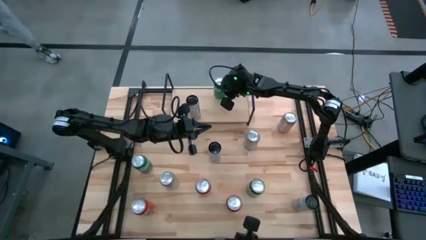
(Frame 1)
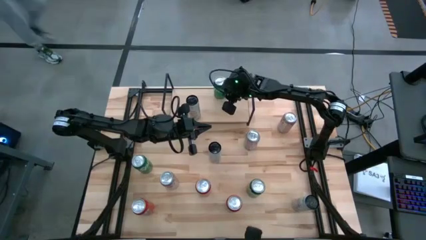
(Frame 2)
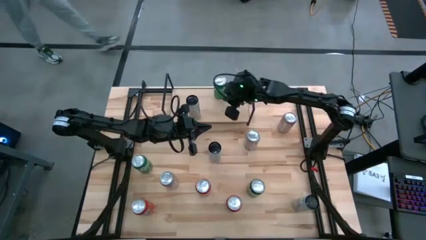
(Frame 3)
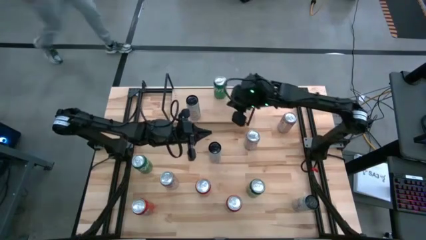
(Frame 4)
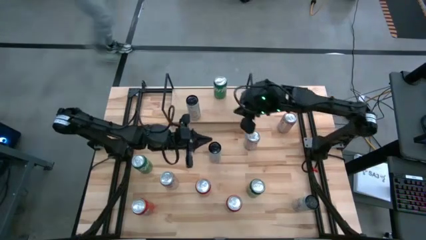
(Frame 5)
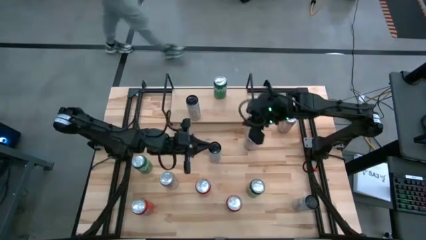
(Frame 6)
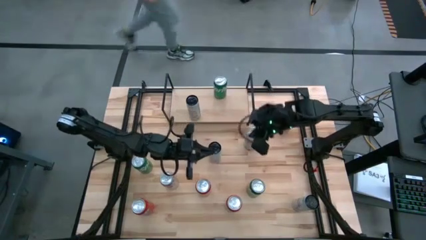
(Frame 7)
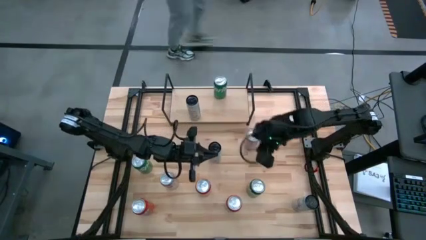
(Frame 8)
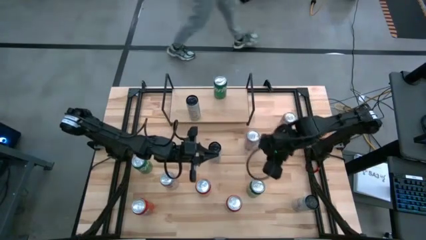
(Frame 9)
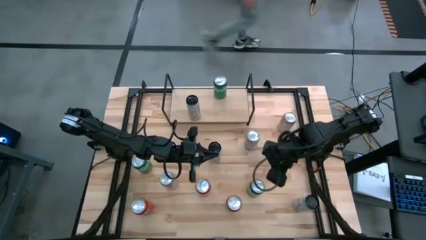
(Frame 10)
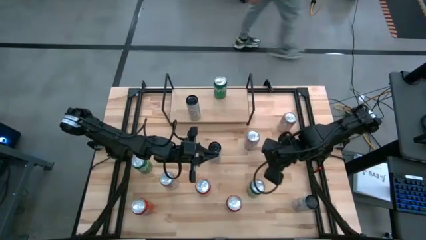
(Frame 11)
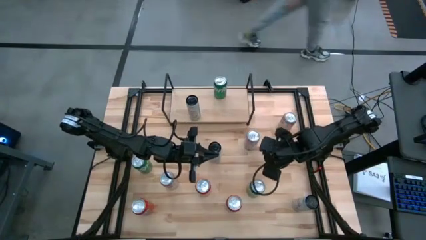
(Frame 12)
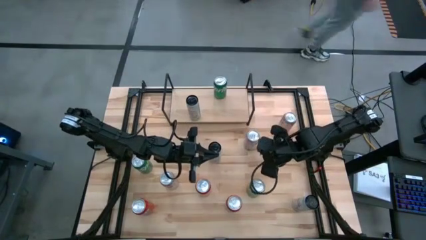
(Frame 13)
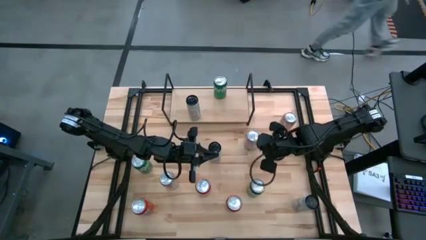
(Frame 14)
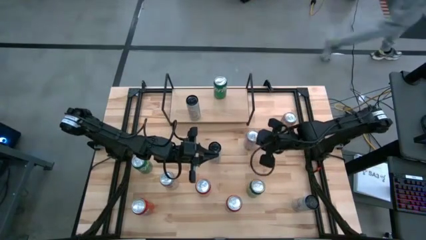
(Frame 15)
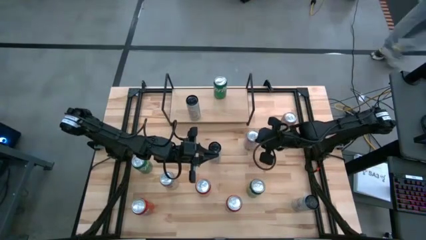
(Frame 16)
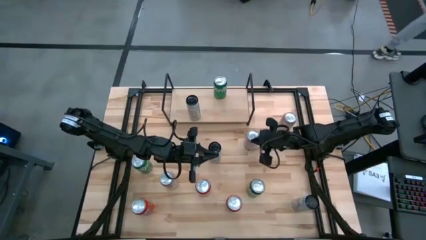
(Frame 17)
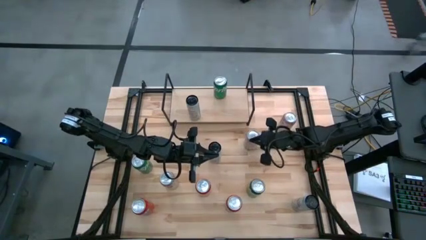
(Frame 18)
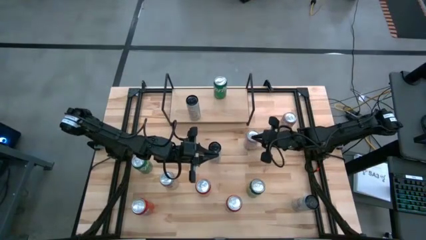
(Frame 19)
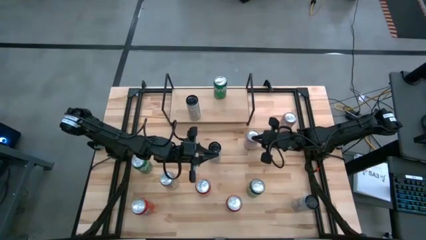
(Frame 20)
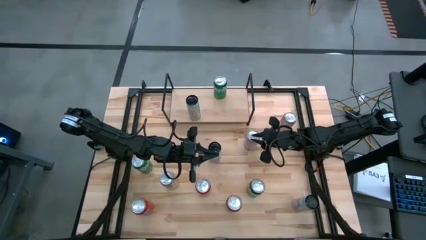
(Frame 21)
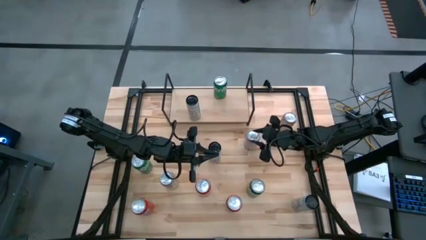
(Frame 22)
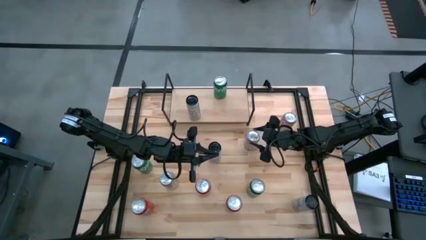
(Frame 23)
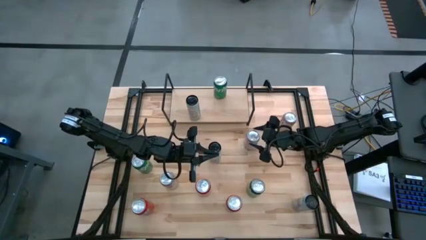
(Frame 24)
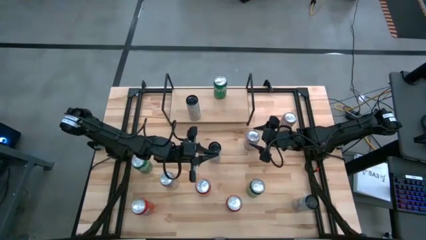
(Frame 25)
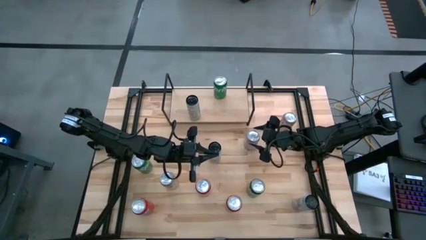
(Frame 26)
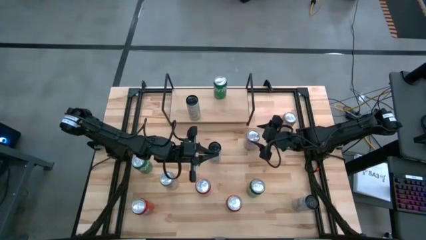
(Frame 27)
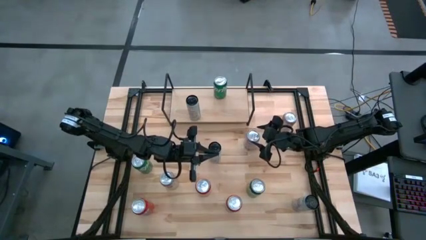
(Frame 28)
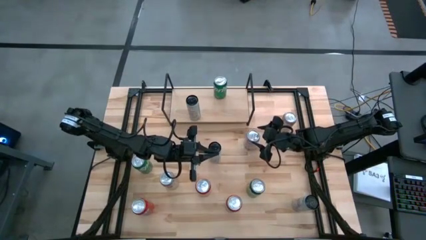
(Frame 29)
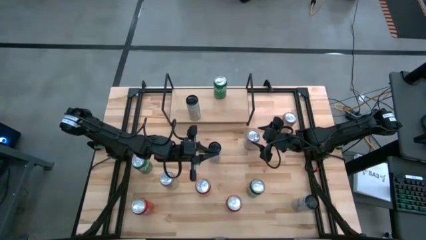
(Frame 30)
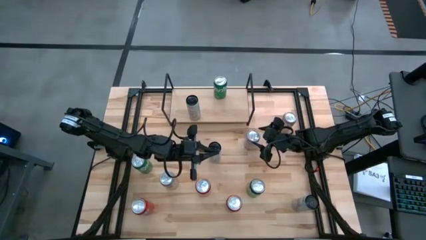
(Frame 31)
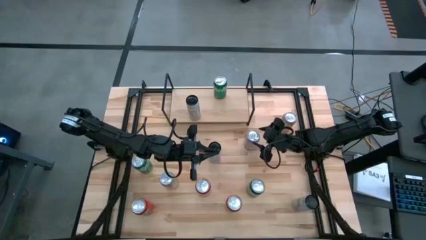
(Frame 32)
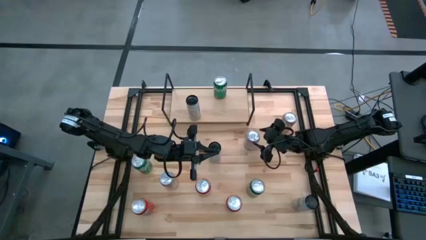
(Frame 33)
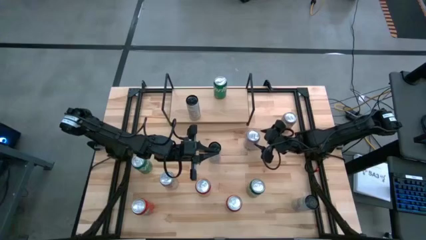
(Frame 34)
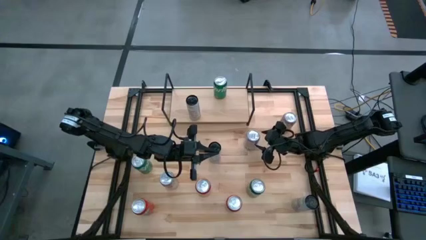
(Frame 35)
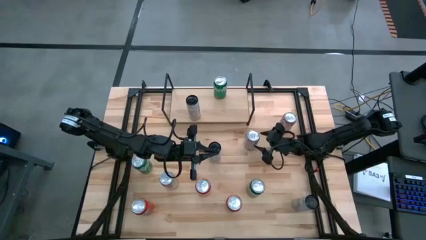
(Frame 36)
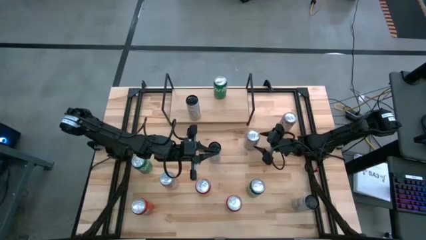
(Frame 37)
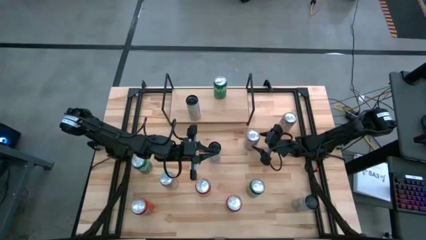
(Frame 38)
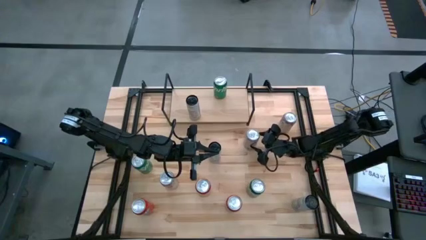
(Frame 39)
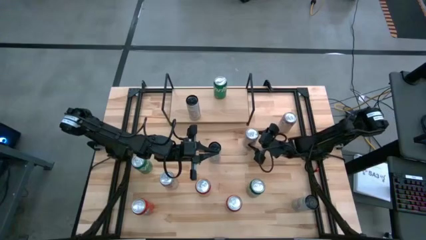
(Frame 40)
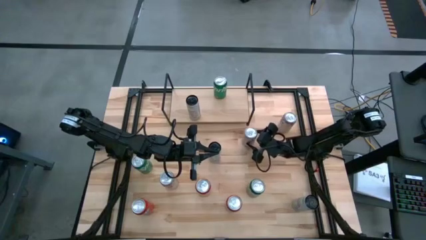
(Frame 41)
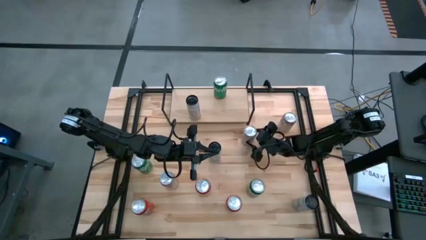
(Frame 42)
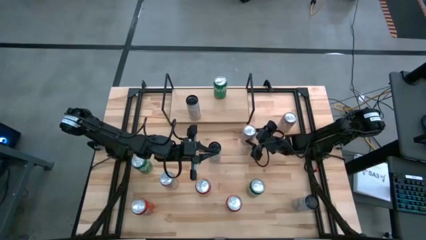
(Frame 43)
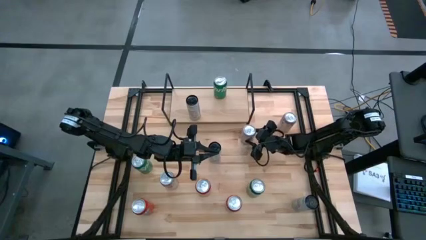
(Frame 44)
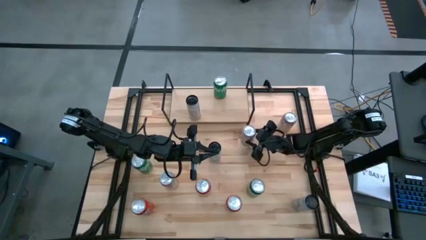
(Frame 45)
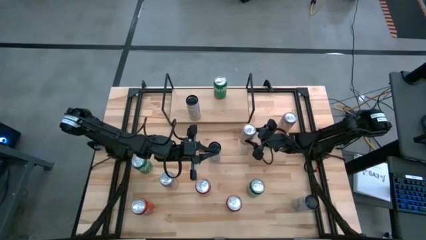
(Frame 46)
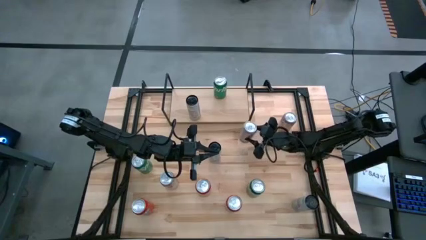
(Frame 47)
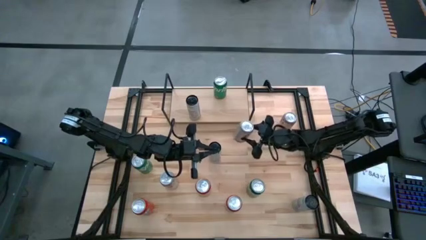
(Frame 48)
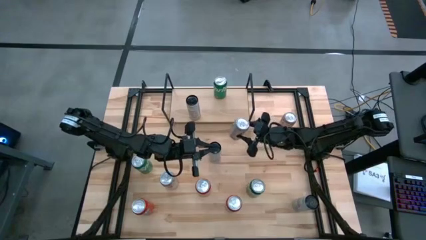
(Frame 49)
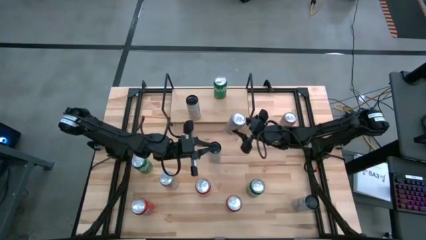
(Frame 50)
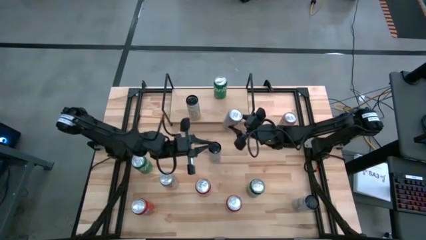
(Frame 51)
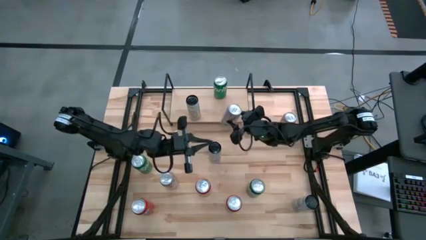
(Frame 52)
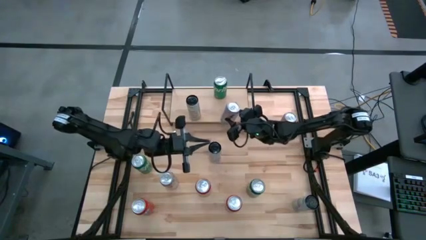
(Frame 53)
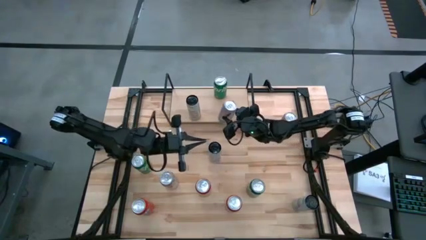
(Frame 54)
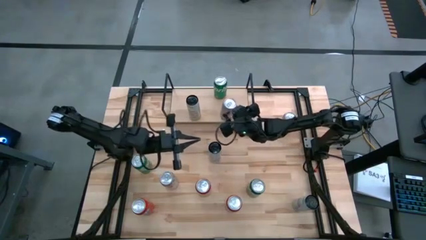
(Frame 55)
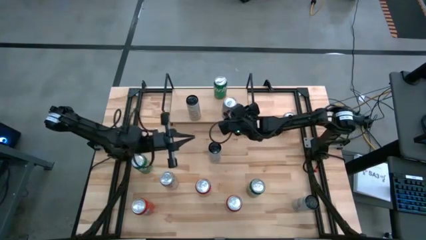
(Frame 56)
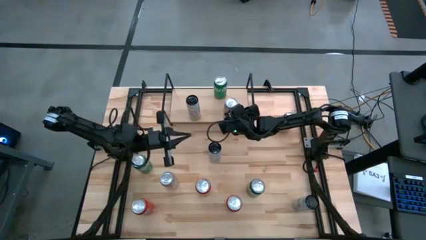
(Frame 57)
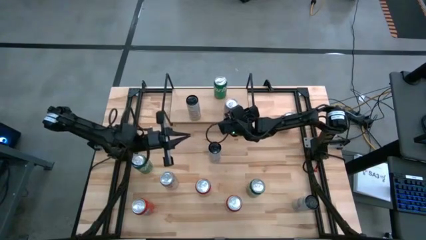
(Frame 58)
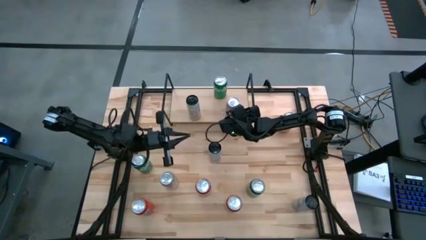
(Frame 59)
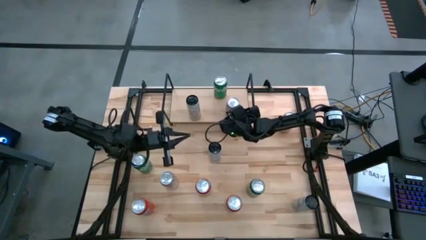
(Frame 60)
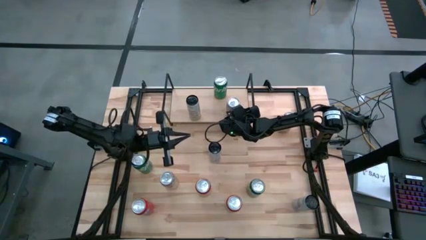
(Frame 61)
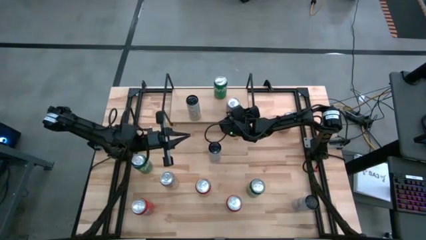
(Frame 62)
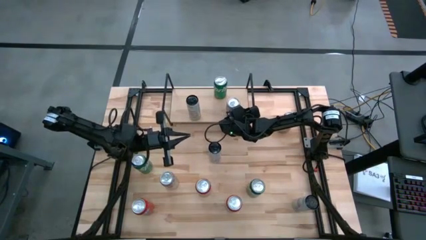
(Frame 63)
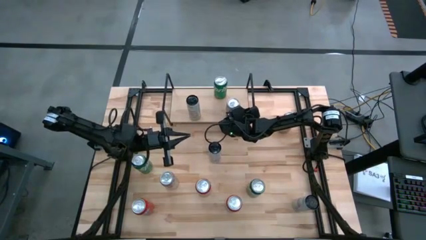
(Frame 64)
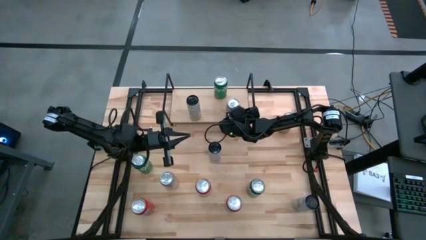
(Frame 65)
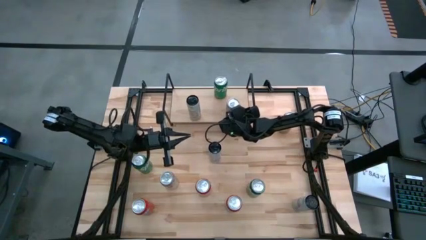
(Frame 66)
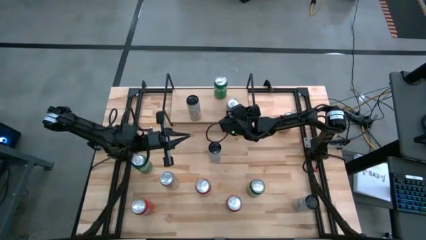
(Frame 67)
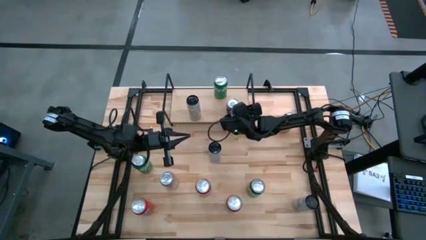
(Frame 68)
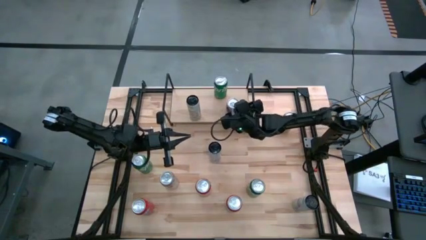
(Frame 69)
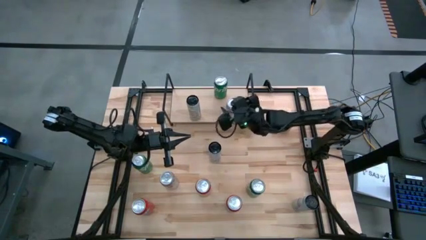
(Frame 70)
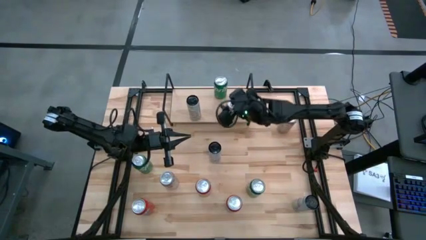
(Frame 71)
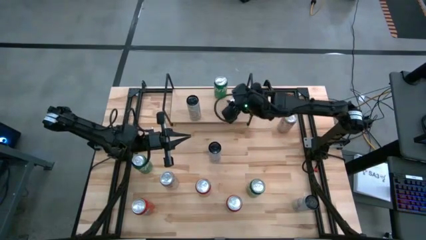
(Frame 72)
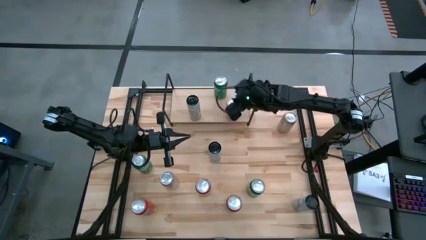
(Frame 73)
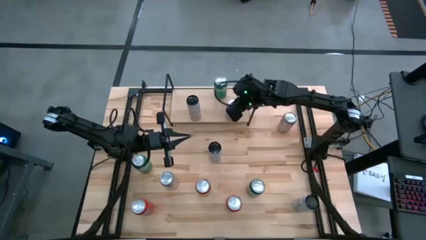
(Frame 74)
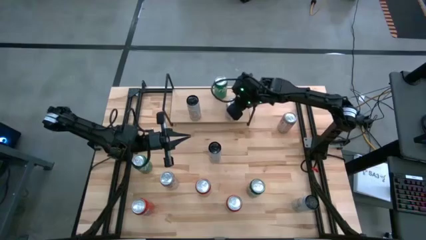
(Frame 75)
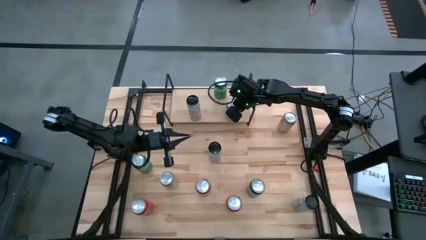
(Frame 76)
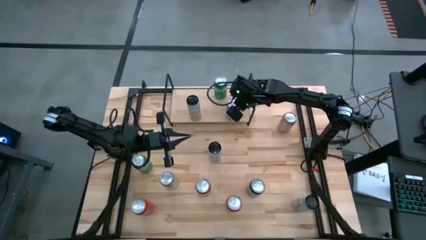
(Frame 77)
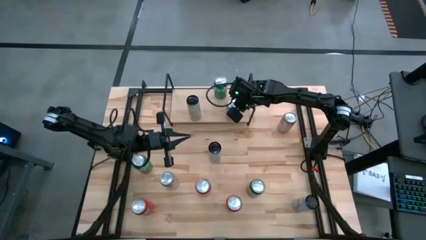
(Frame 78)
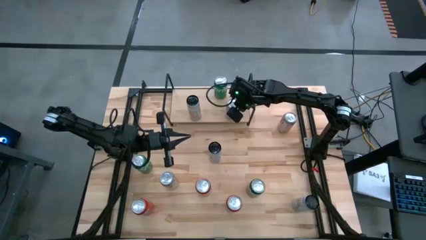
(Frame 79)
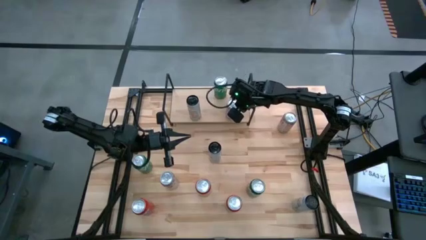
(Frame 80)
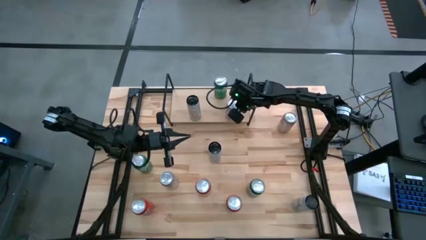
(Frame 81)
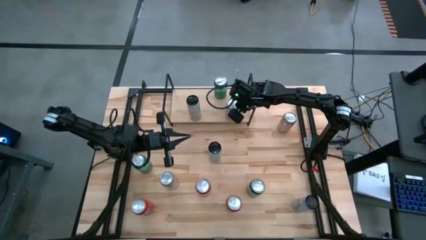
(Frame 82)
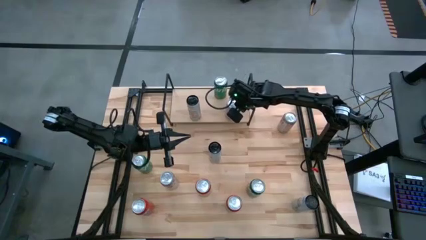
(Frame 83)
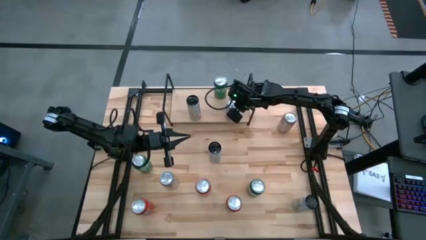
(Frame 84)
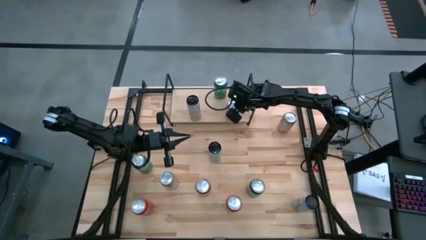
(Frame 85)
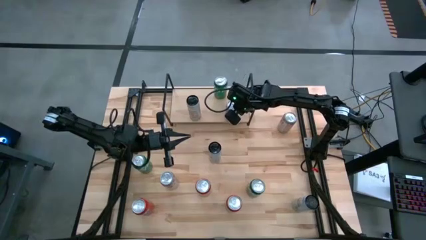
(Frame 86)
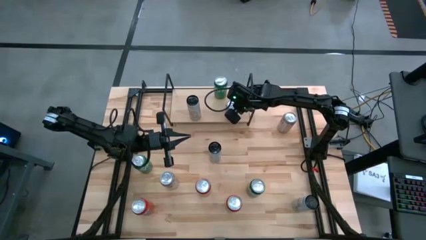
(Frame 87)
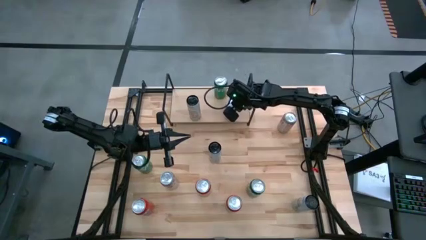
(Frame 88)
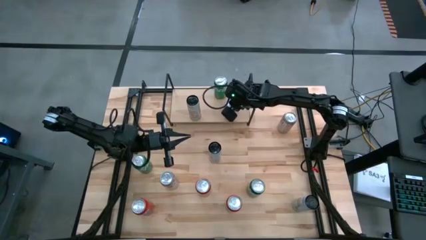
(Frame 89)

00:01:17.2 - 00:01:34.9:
Task: Sort soda cans
Put the middle red silver soda can on the shelf
